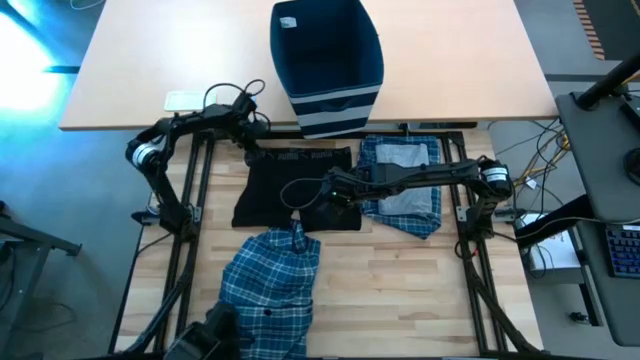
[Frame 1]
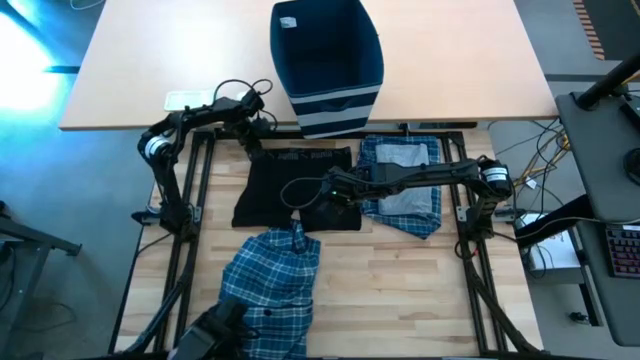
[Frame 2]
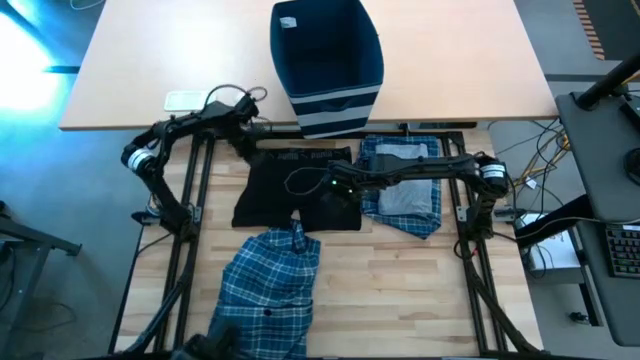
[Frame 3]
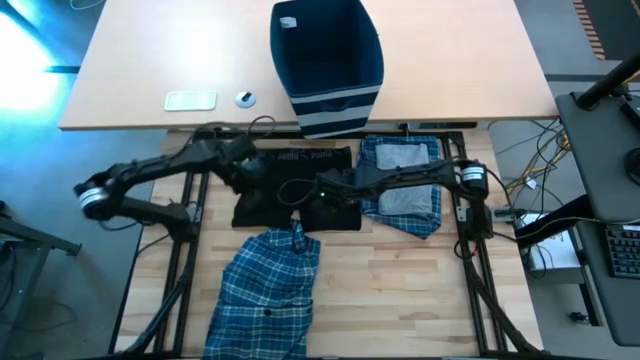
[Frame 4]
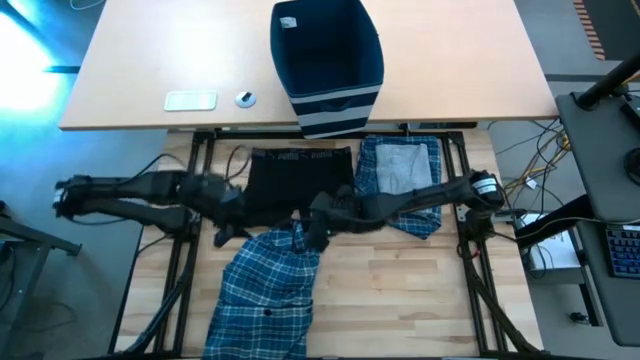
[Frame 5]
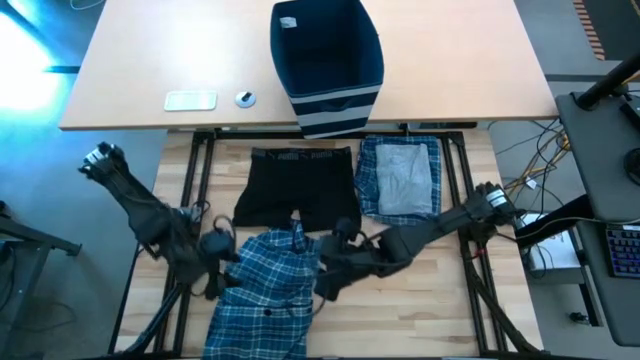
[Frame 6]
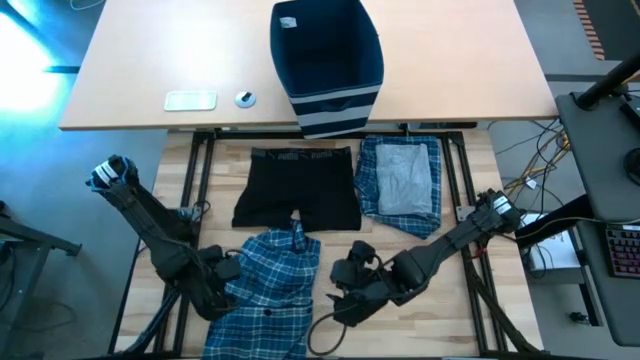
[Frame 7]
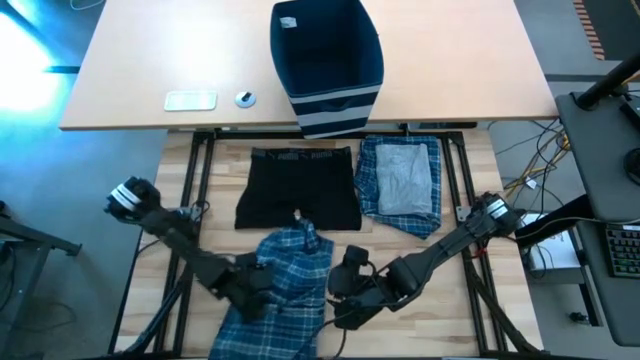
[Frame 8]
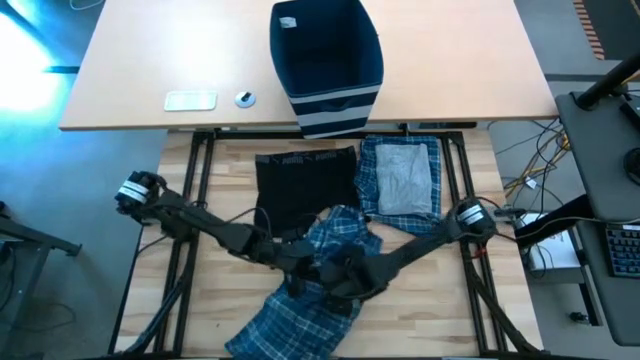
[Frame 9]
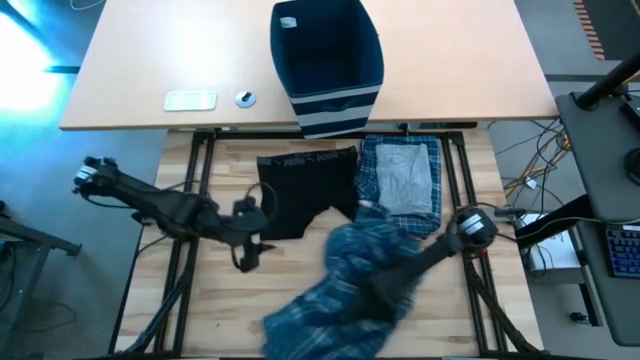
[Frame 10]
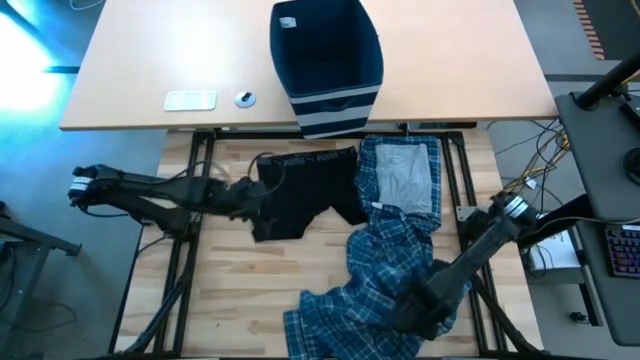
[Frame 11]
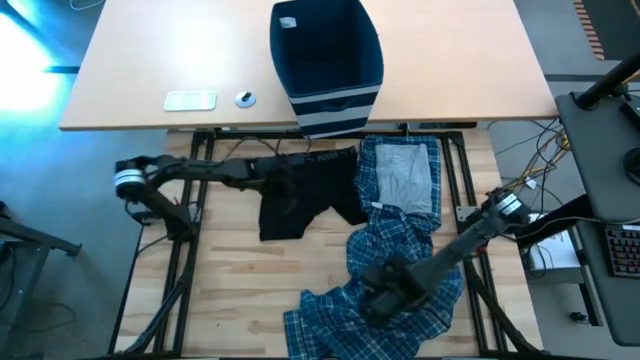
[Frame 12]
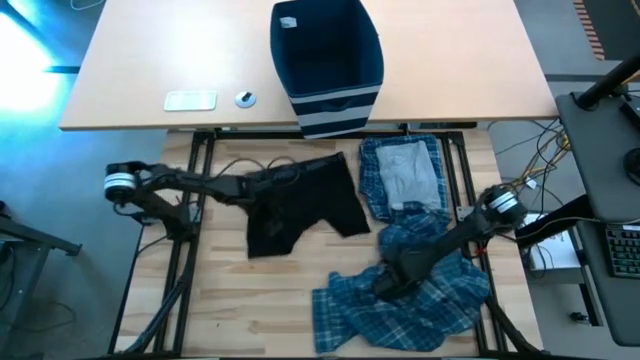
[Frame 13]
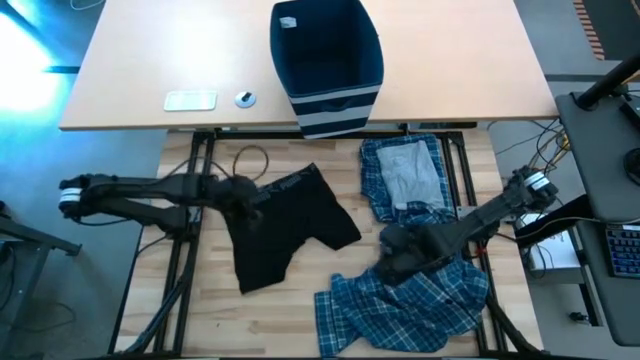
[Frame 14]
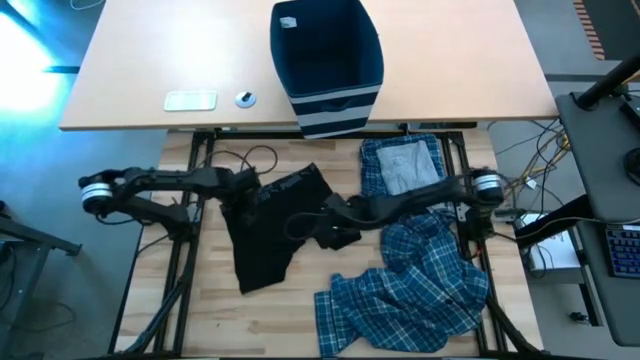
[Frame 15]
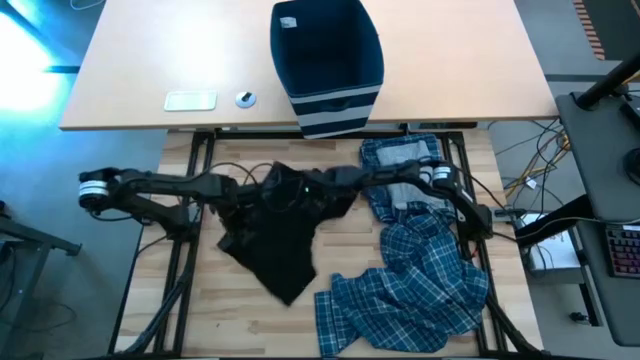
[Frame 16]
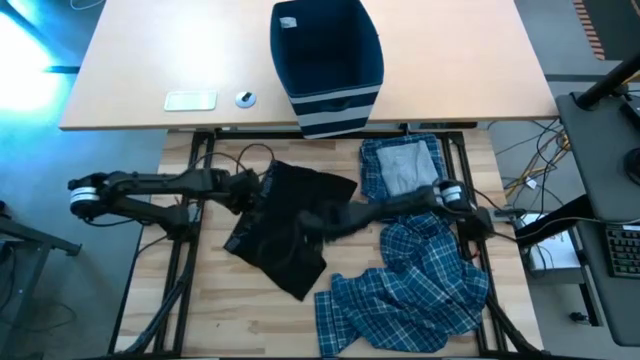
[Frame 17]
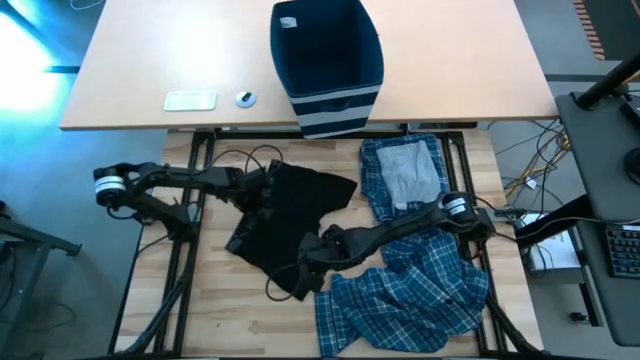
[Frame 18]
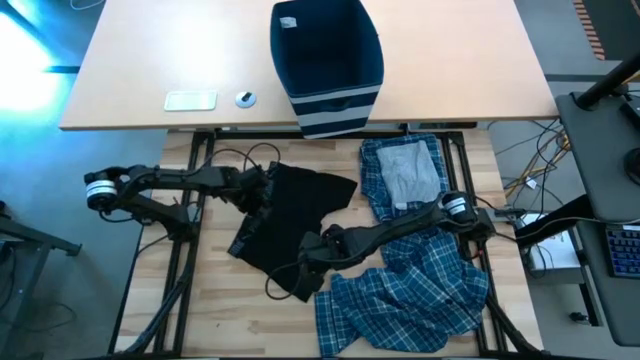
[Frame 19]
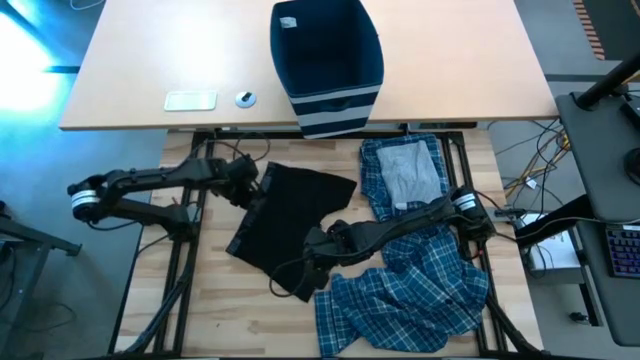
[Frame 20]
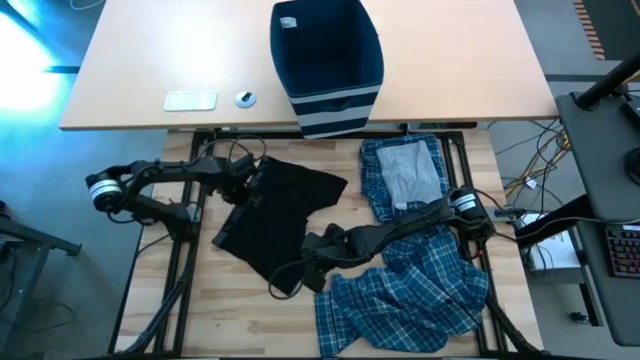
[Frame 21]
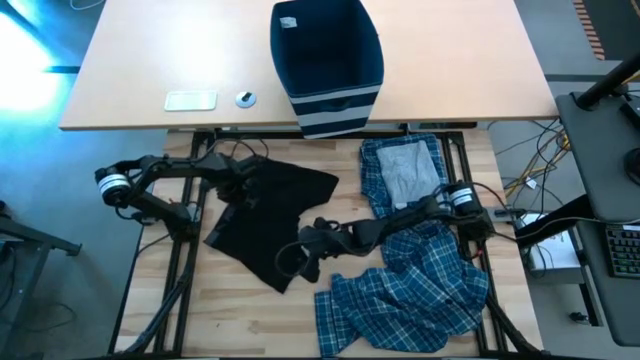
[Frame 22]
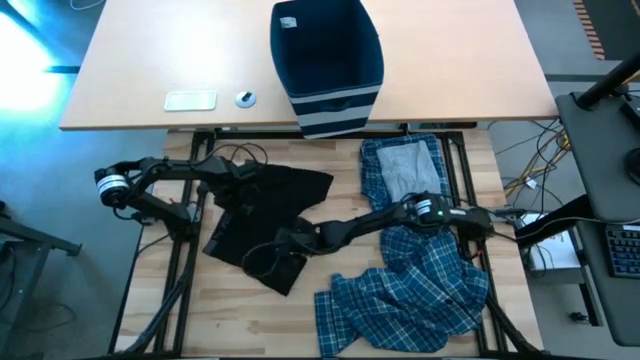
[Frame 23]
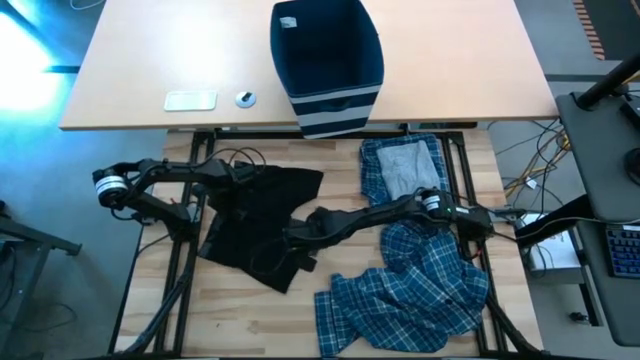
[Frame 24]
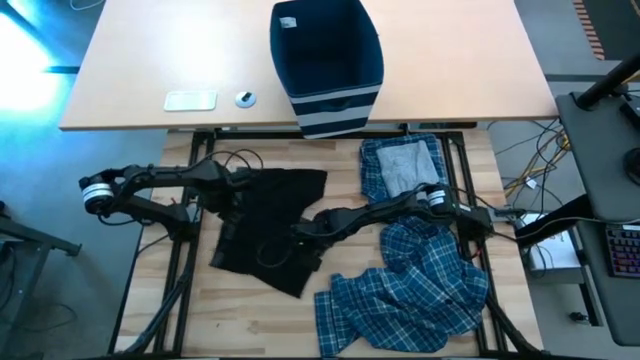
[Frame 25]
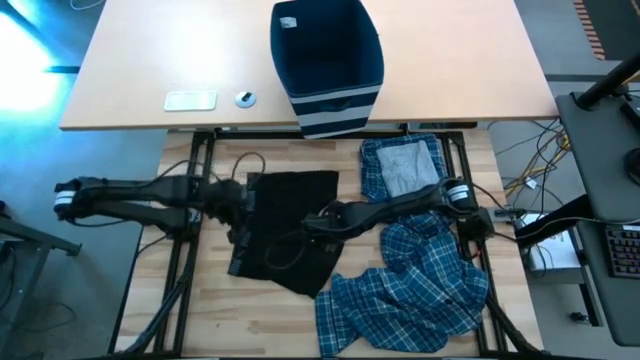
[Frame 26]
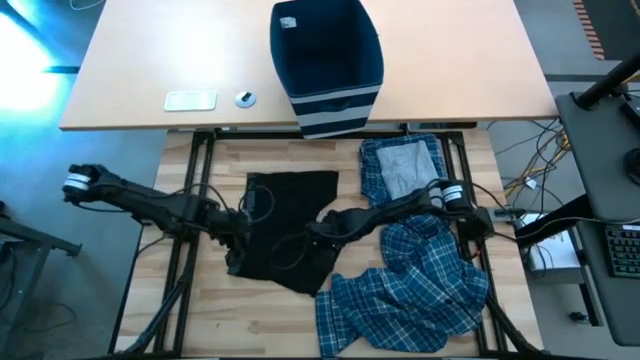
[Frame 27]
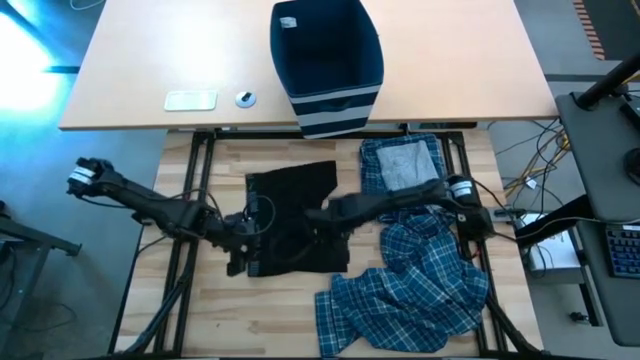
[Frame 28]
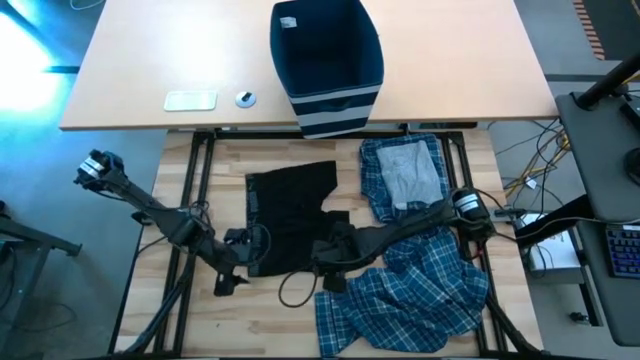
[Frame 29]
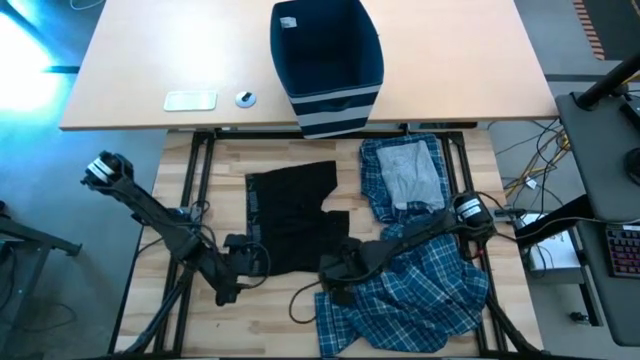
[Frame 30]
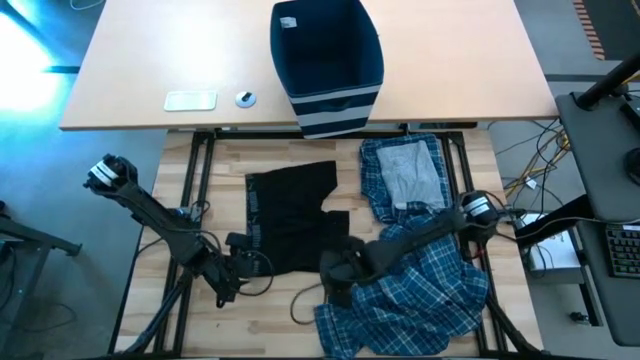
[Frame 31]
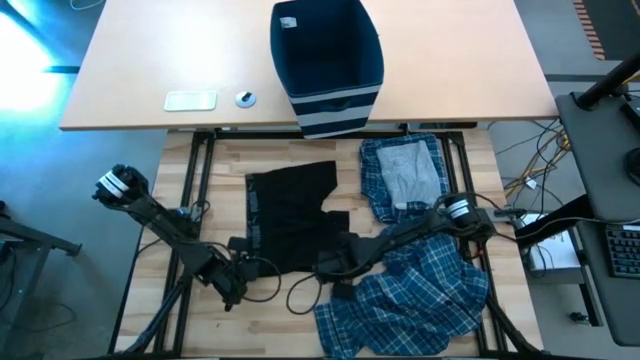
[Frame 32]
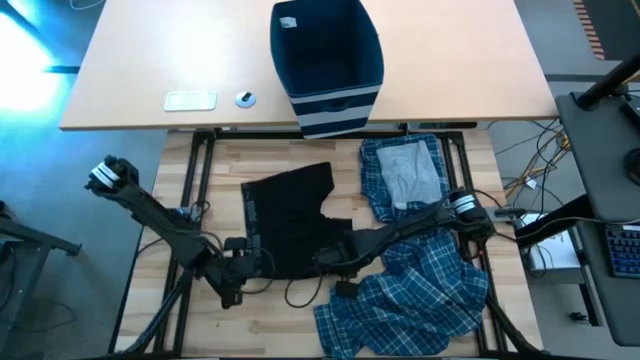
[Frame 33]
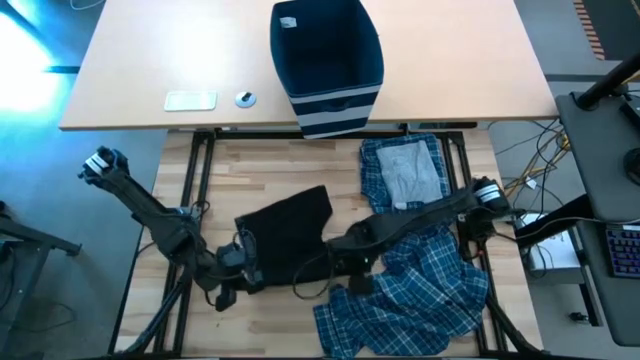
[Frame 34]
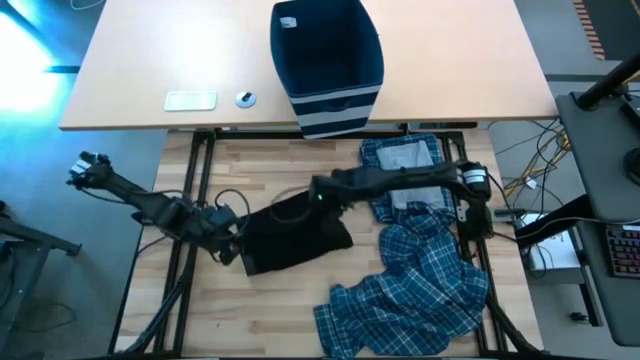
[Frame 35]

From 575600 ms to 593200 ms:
Task: Fold Laundry from Bin
Fold the black boxer short

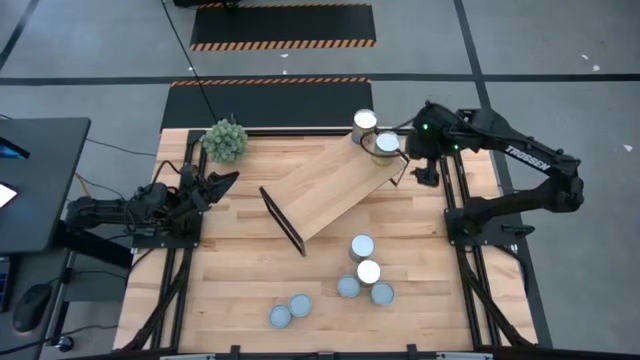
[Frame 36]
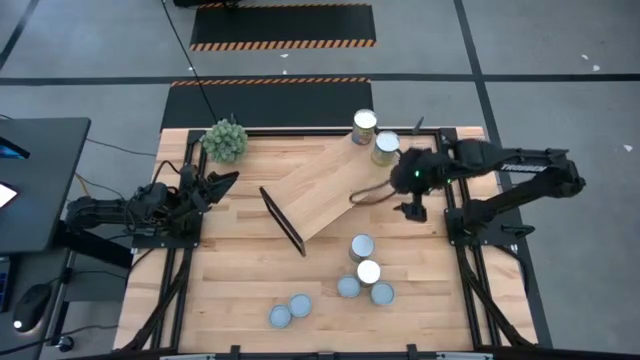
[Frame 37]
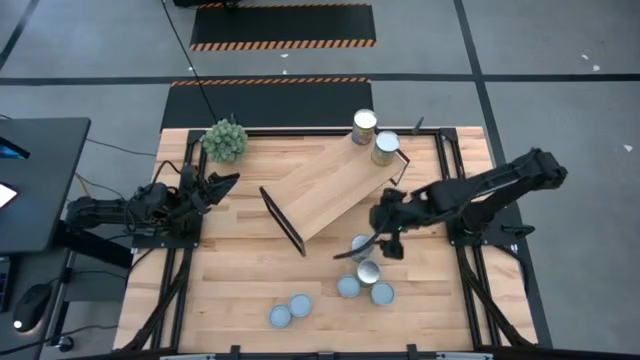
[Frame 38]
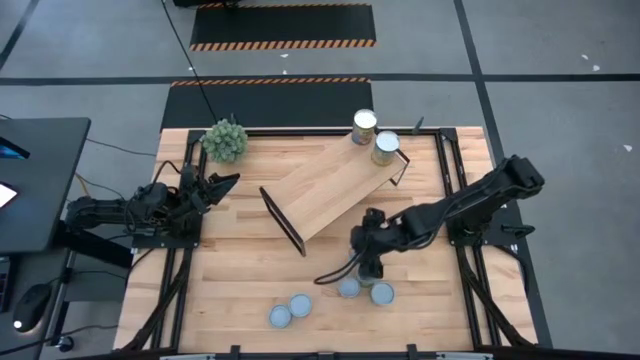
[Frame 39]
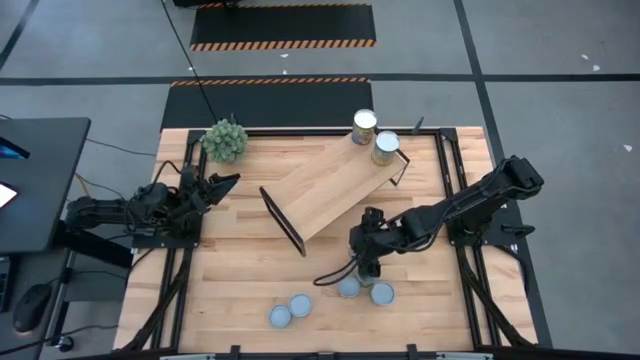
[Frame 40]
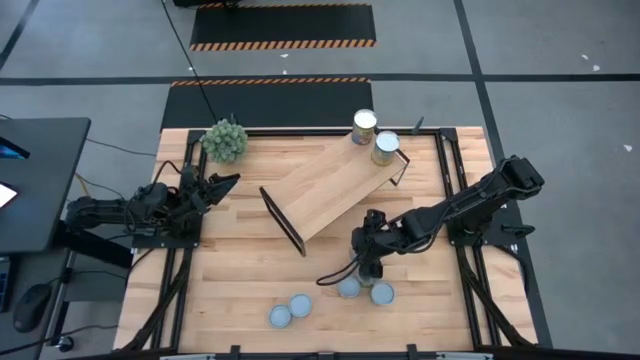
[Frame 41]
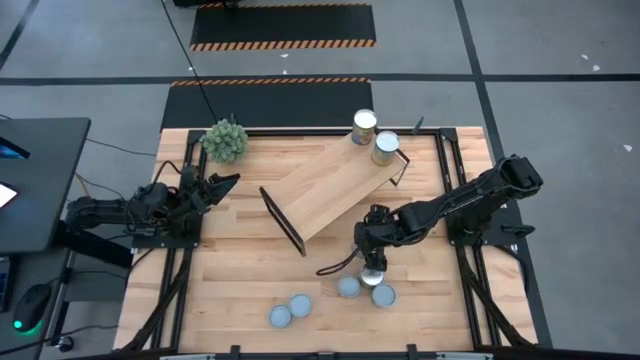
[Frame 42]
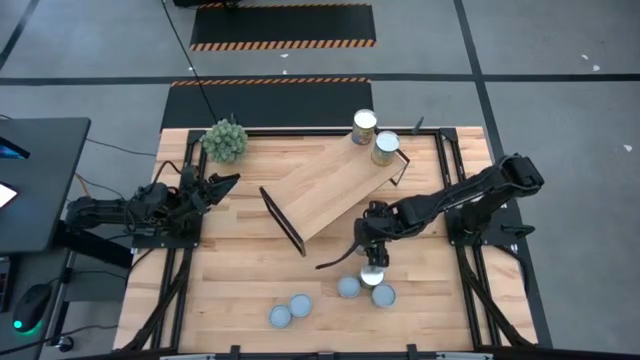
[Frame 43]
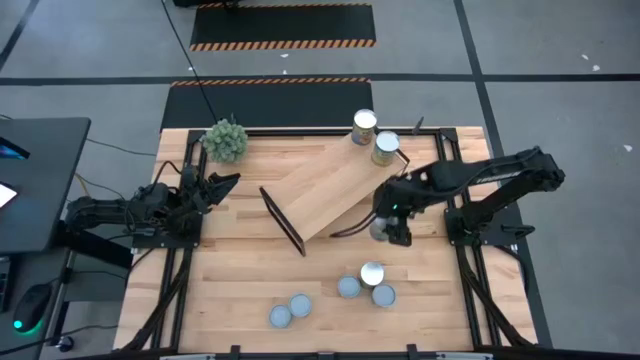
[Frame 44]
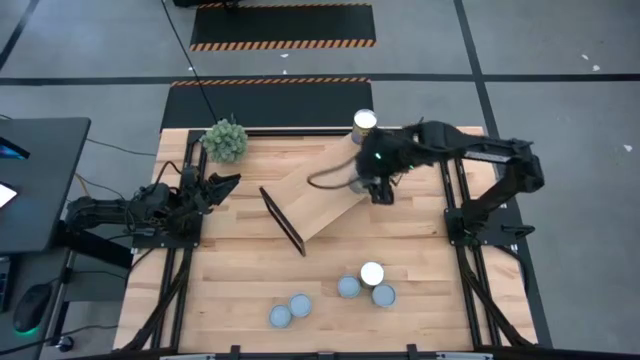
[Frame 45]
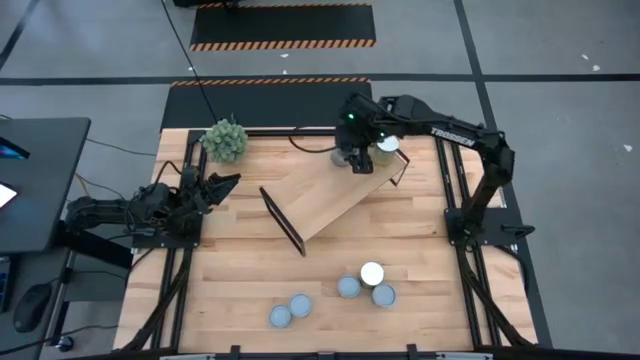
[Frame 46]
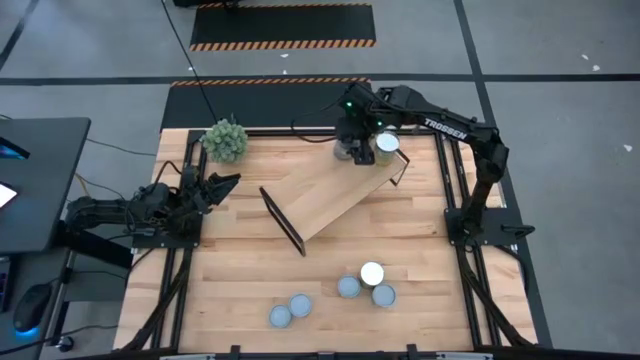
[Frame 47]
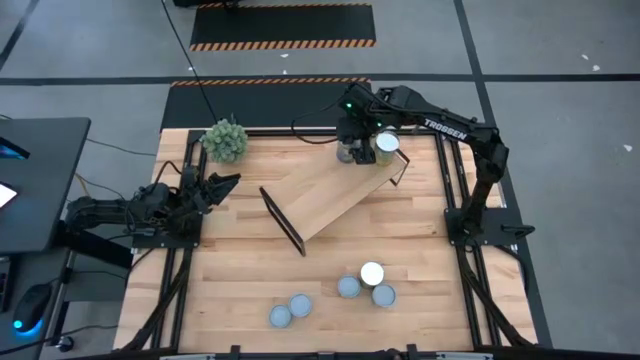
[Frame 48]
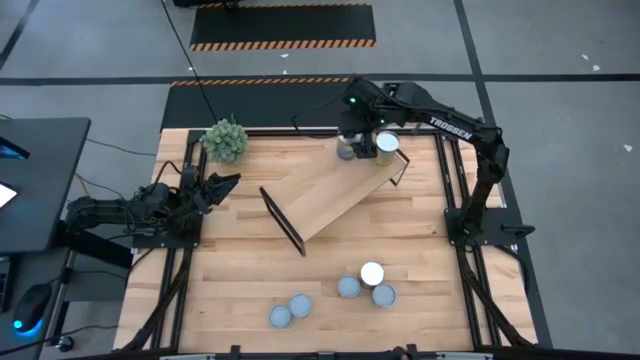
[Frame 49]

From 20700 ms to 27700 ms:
Task: Pick and place cans onto a shelf
Put the canned peas on the shelf
